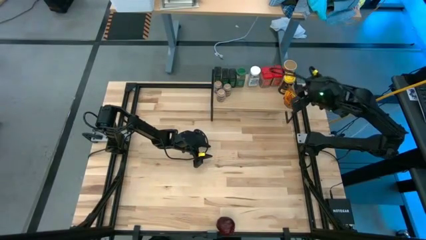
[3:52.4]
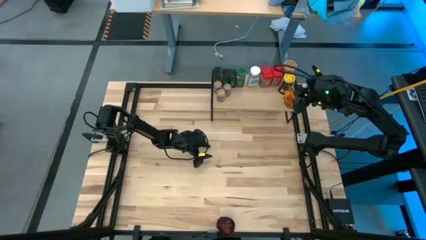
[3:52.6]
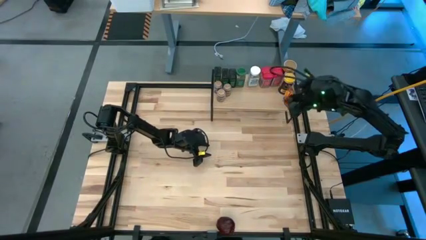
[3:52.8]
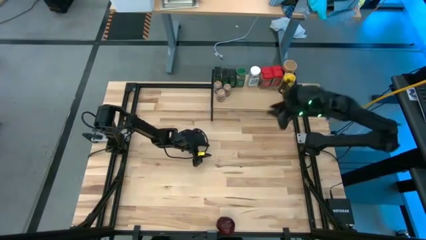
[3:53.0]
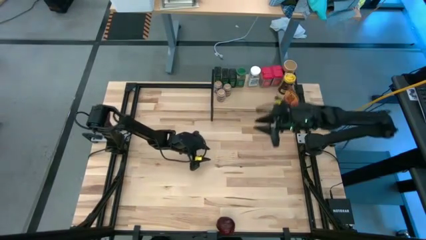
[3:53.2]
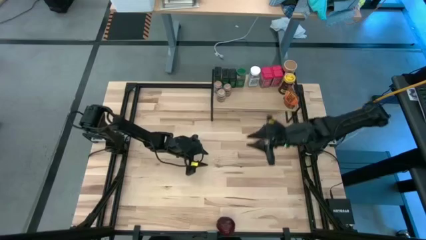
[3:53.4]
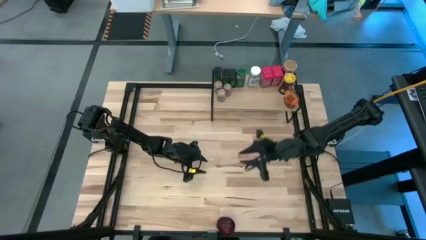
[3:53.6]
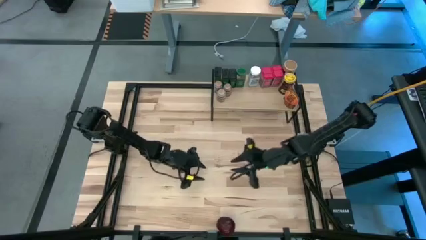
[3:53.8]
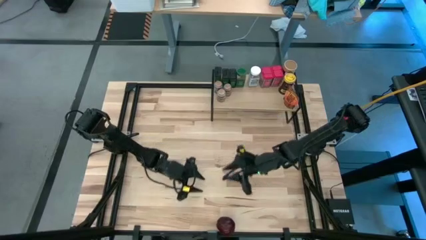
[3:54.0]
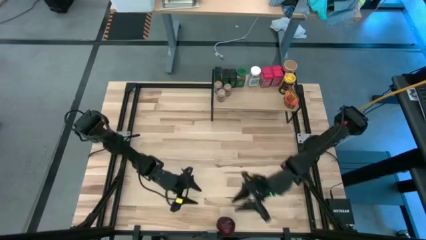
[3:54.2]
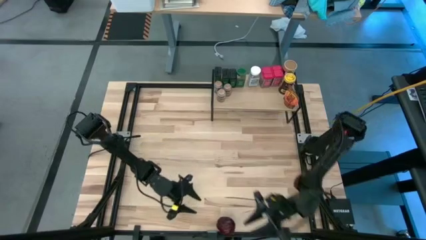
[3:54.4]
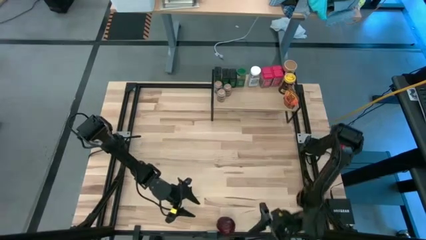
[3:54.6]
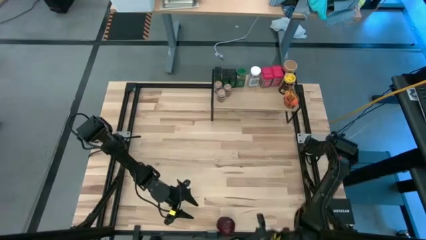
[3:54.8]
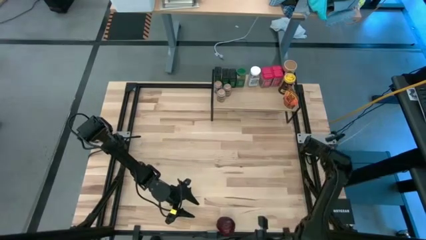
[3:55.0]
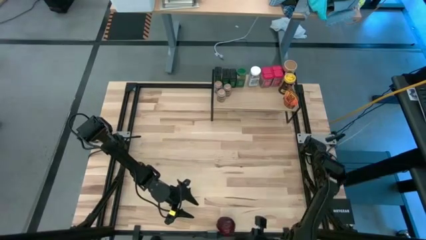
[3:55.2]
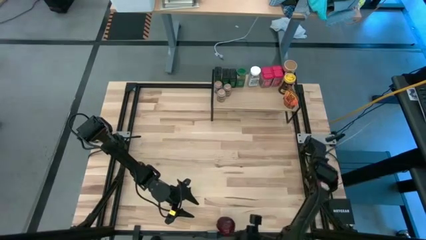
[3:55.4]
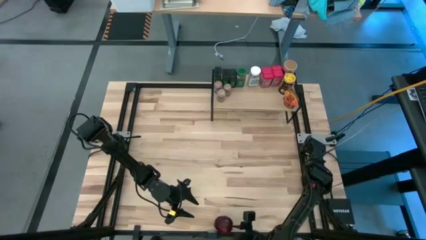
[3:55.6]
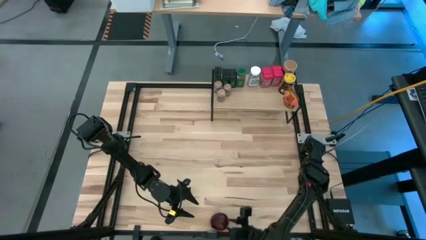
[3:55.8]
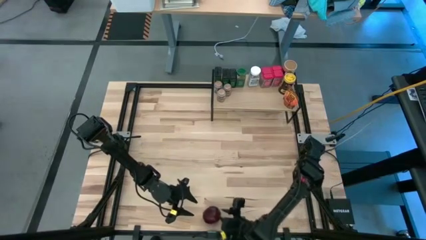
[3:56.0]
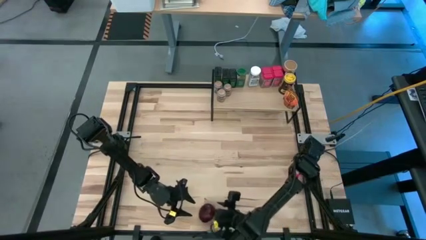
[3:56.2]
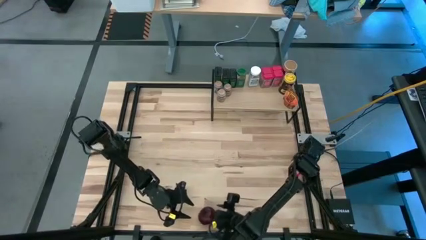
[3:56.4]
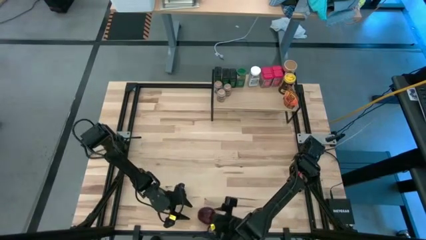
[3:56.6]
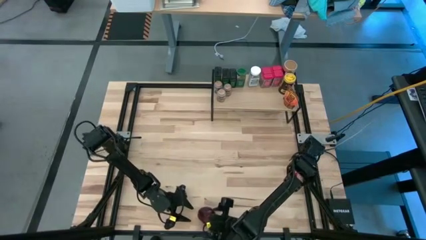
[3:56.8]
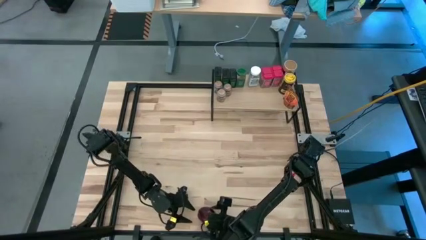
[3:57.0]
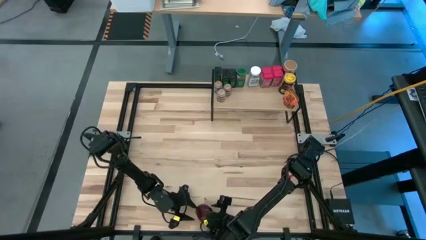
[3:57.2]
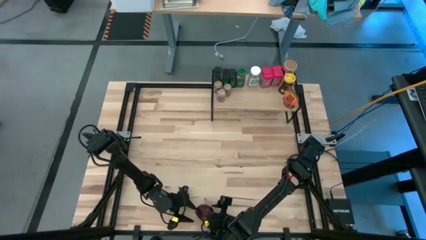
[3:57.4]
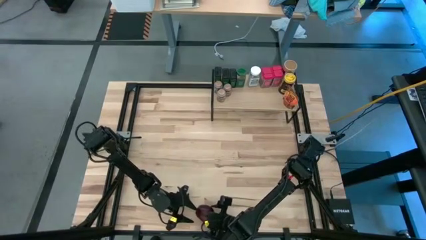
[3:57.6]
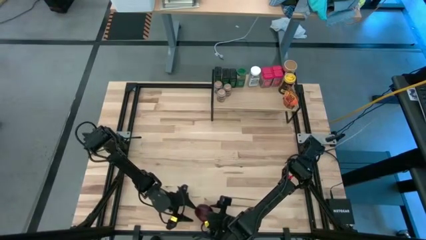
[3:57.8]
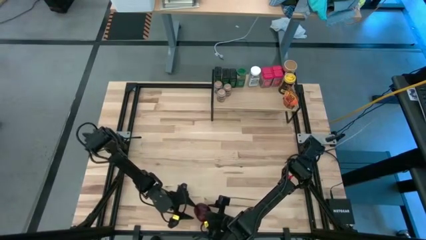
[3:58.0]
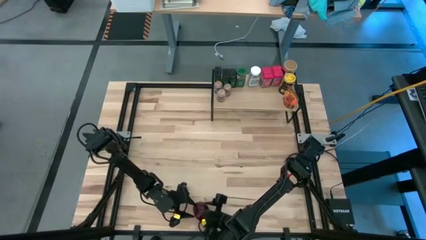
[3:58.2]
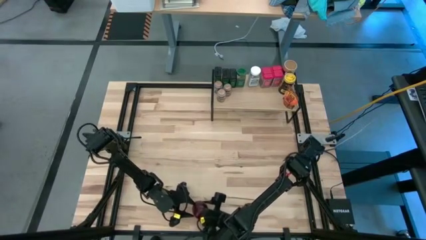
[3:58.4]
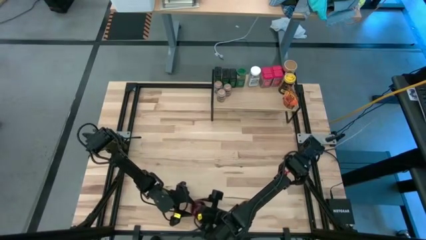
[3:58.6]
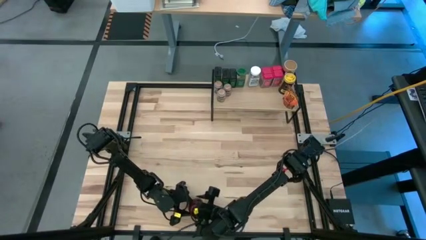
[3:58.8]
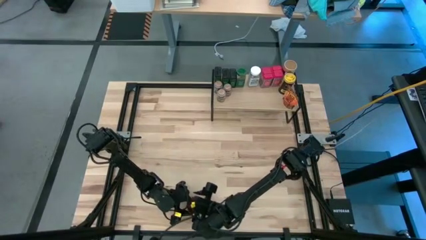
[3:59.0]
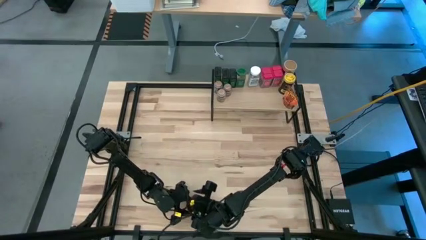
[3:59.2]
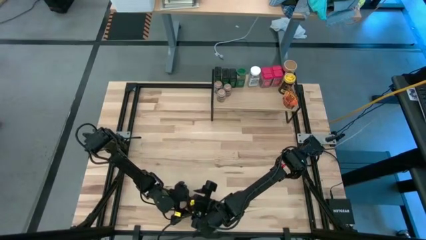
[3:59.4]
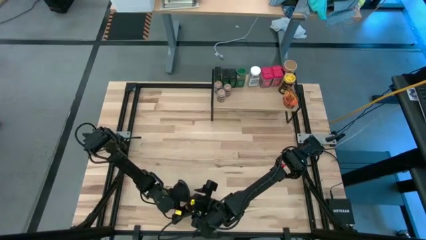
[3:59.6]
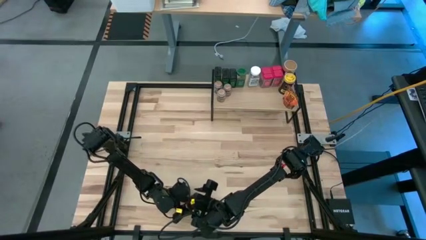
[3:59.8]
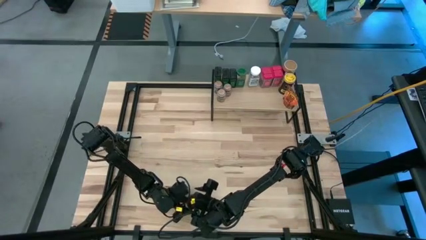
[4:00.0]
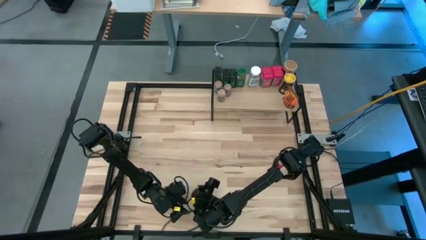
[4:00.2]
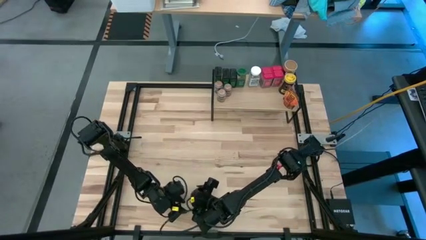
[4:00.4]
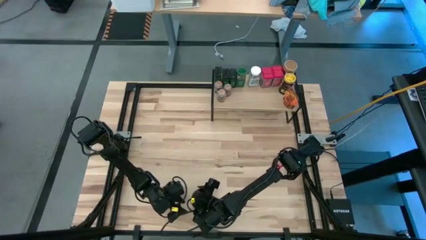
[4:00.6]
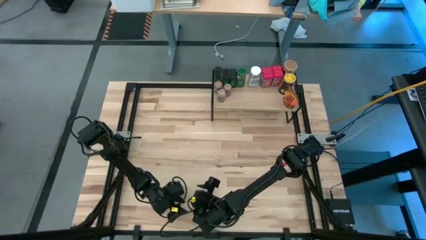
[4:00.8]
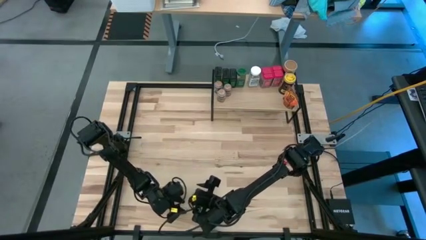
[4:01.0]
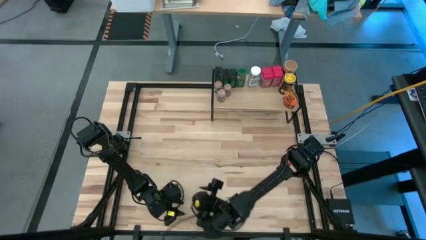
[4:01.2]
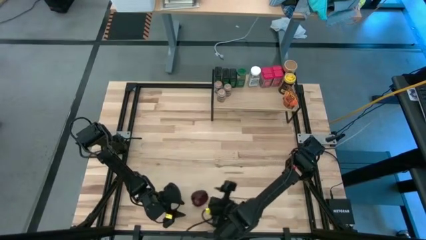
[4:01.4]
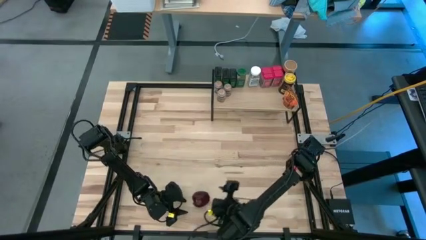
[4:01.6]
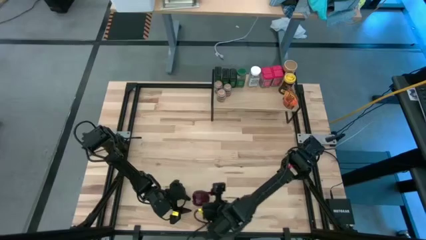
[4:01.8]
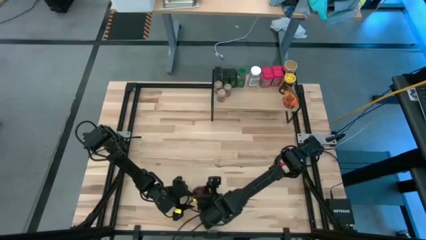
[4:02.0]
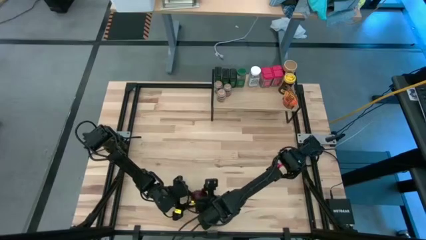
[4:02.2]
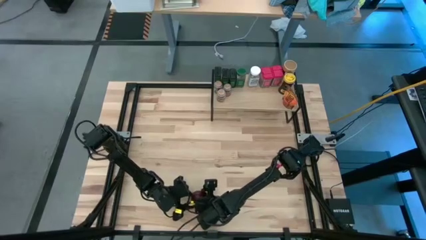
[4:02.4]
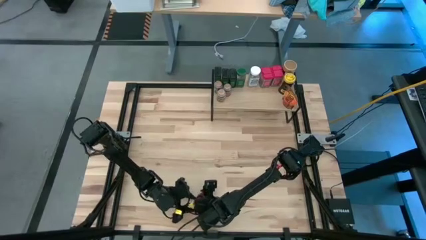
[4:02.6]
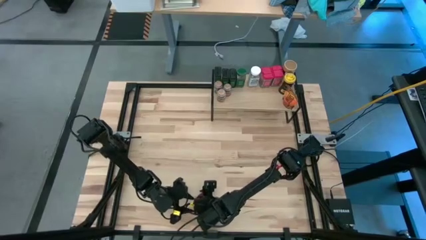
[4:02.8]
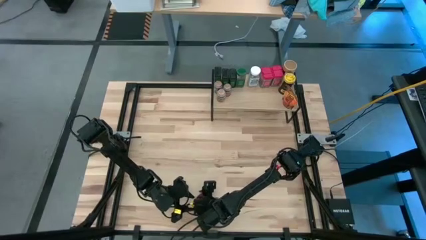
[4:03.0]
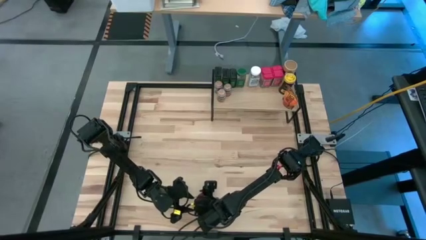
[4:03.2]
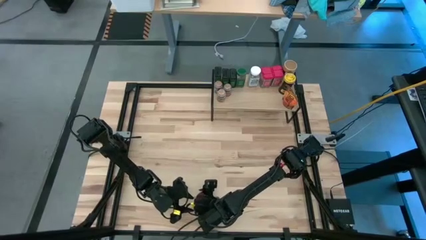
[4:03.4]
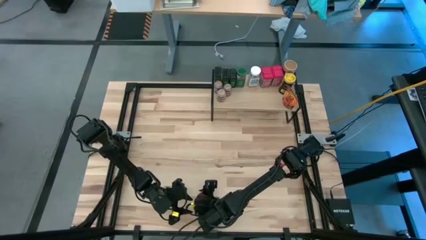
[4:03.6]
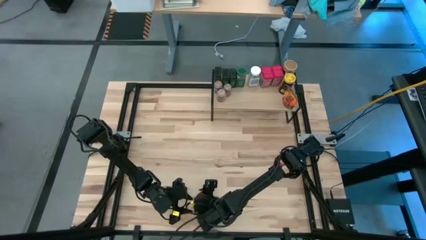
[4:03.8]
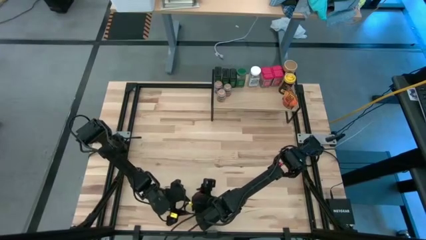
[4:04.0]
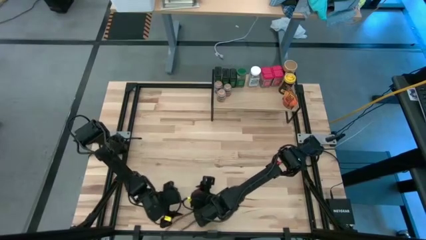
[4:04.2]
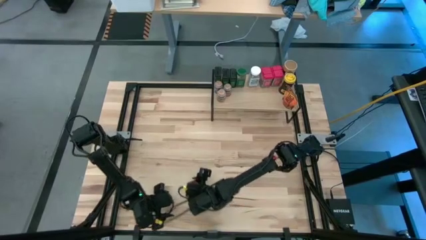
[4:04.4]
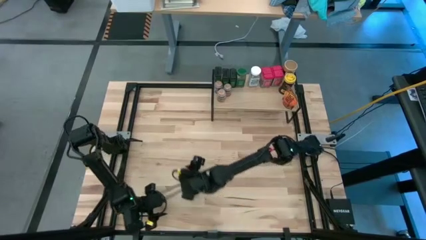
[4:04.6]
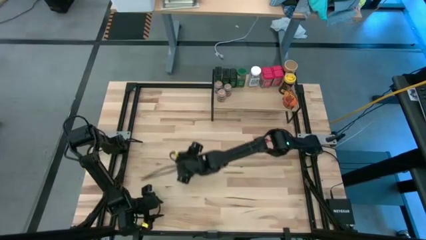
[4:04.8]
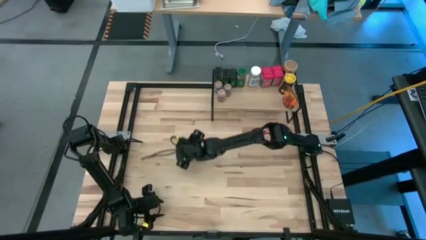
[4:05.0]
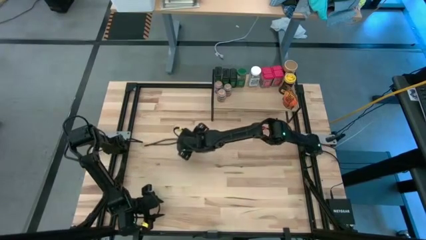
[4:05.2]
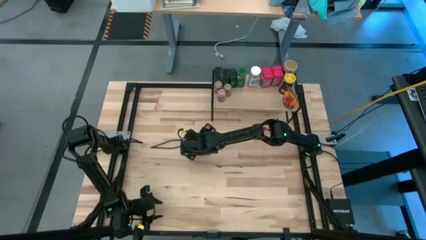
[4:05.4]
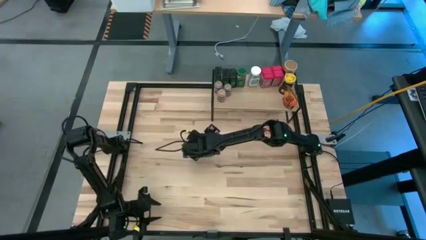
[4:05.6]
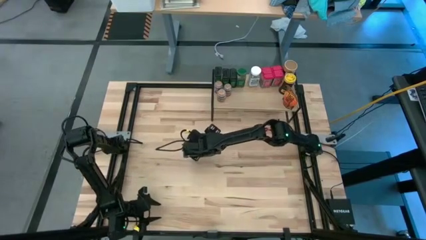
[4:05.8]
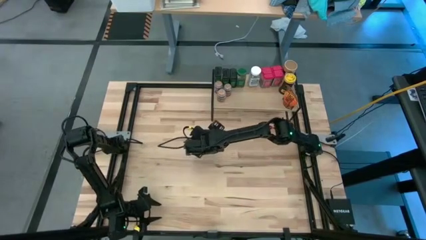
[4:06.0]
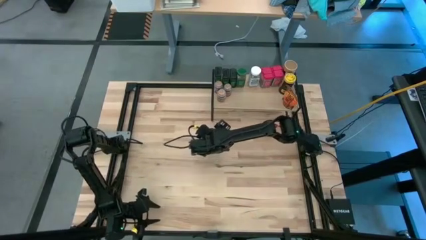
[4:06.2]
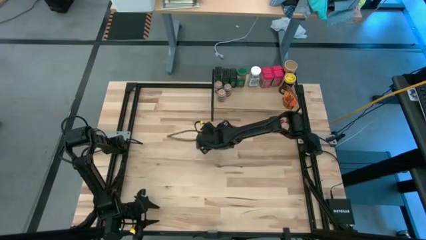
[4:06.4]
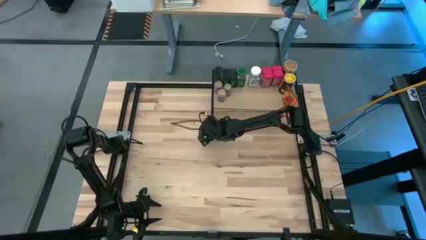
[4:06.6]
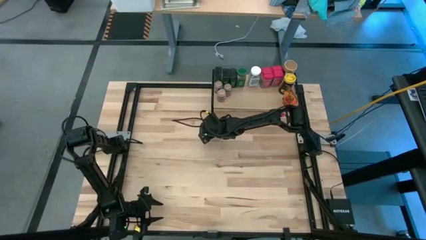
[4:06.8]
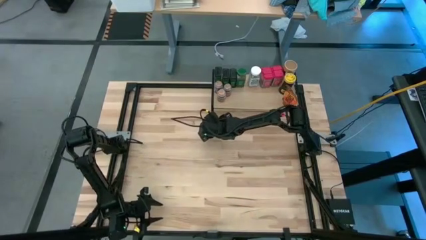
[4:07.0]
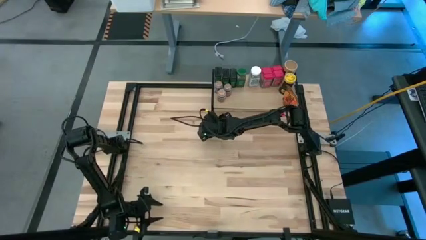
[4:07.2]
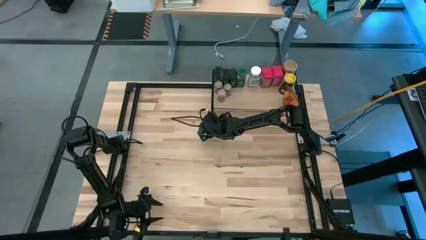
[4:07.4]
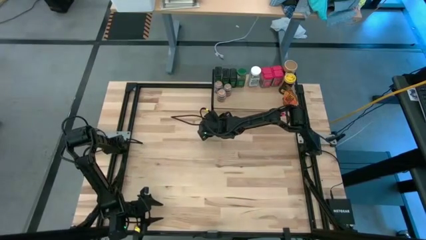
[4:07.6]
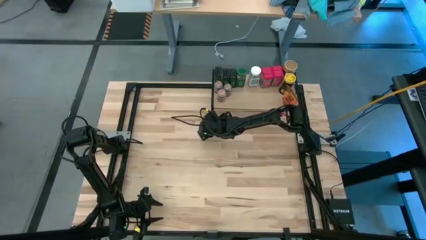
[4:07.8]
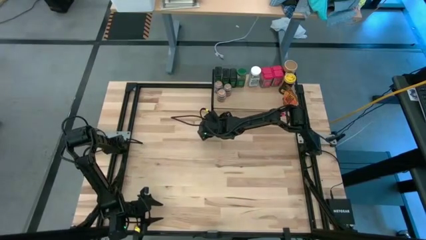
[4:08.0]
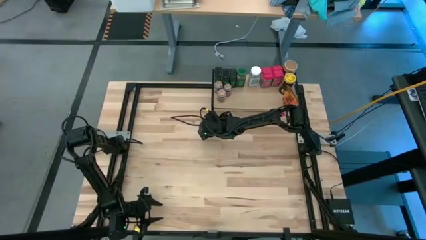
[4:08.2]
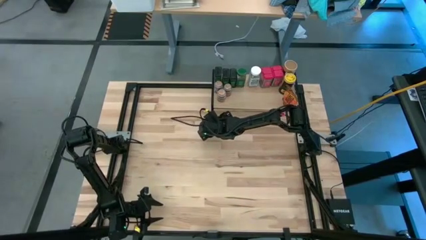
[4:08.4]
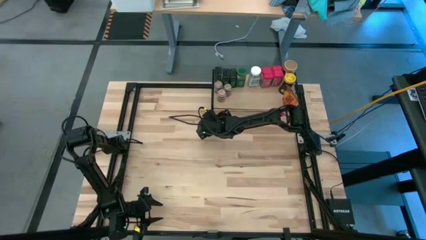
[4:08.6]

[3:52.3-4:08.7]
Task: Shelf spices
Put the red apple under the shelf
